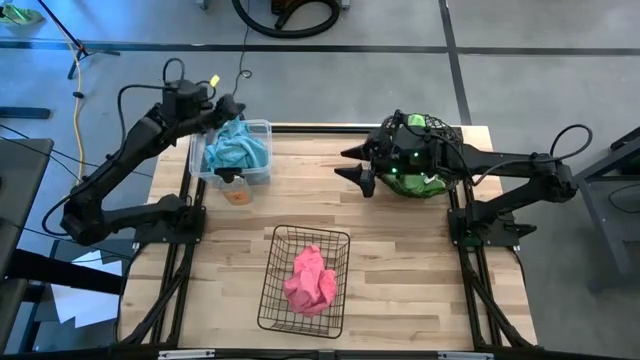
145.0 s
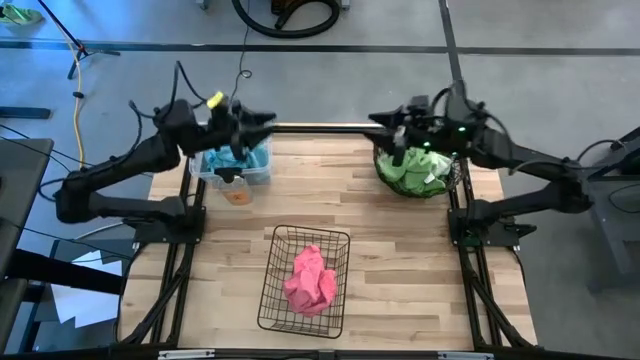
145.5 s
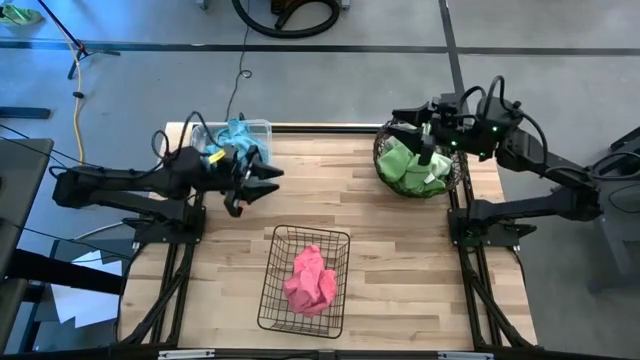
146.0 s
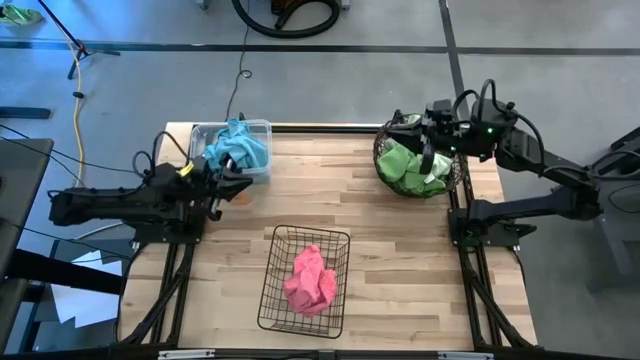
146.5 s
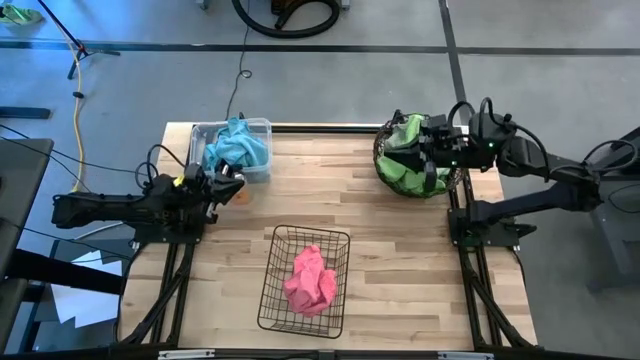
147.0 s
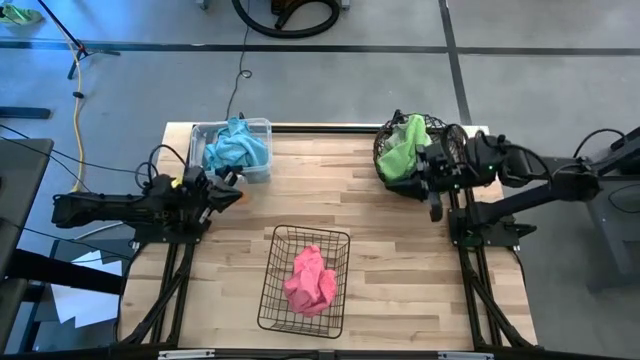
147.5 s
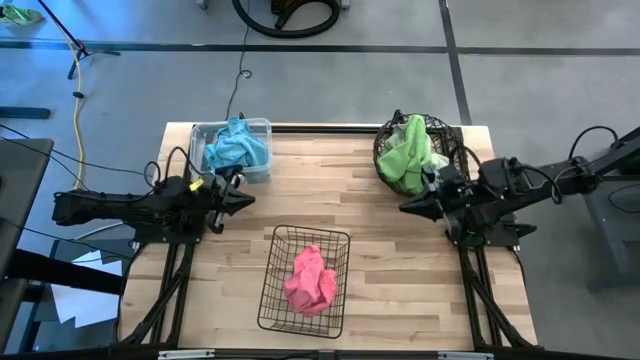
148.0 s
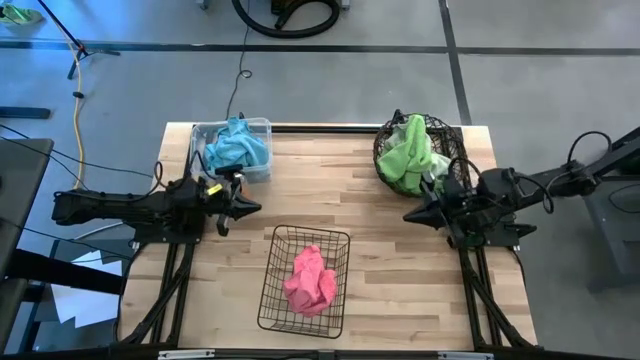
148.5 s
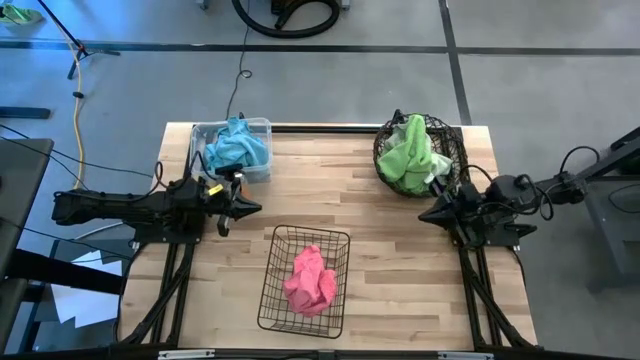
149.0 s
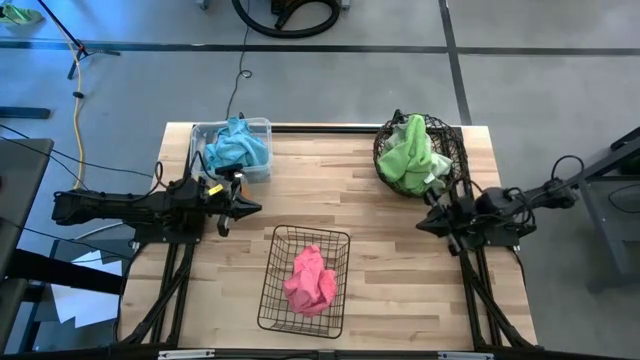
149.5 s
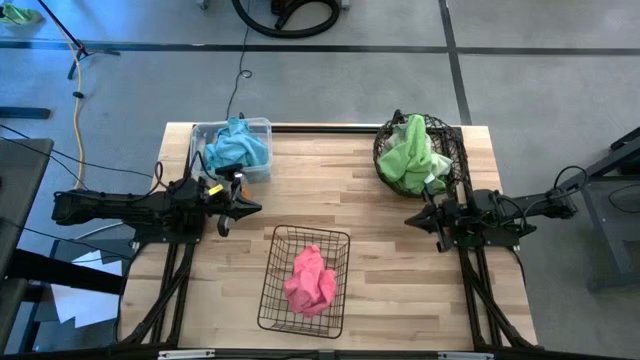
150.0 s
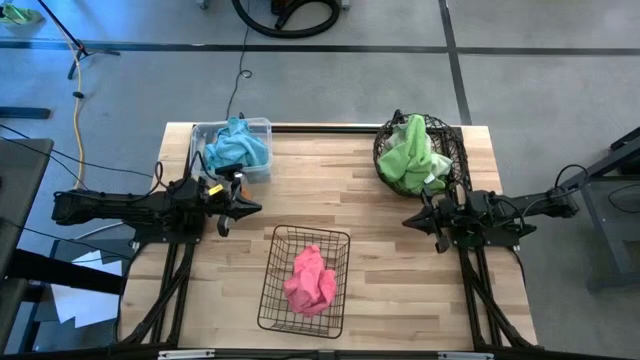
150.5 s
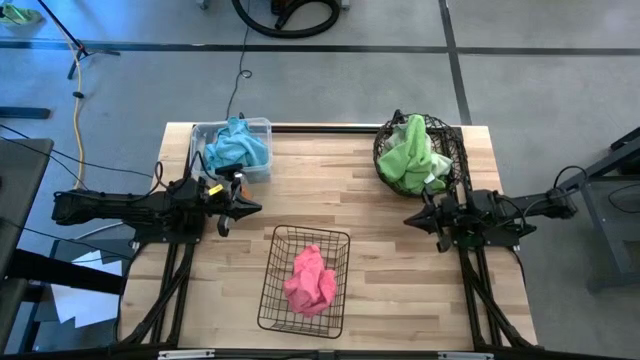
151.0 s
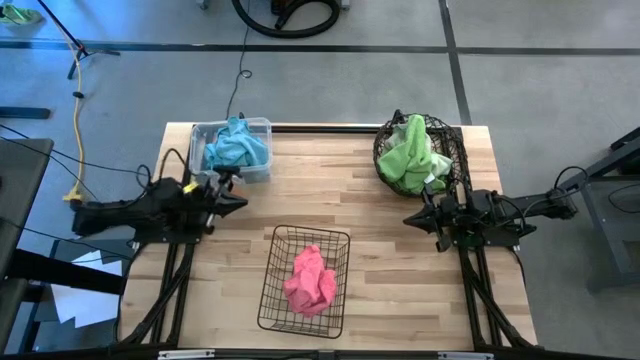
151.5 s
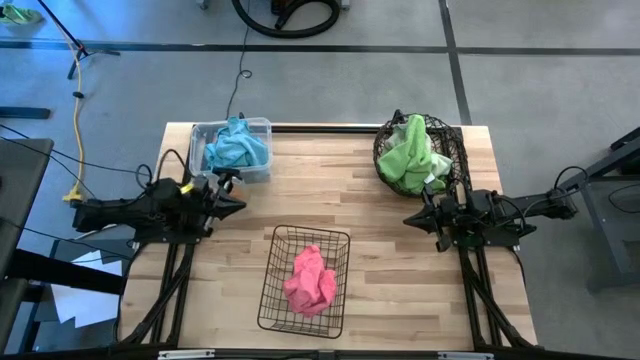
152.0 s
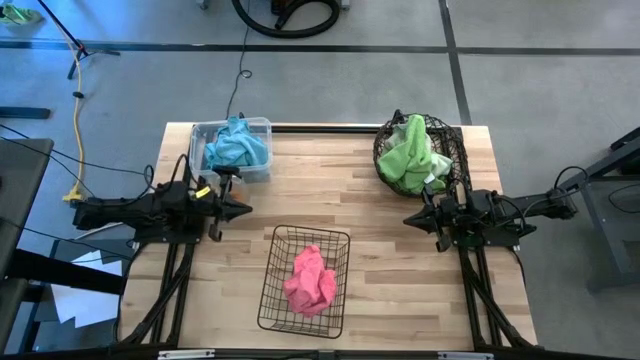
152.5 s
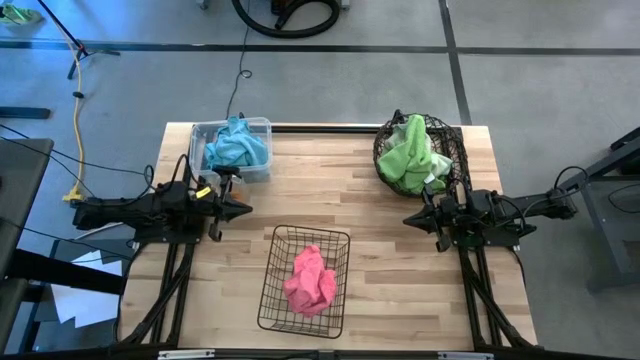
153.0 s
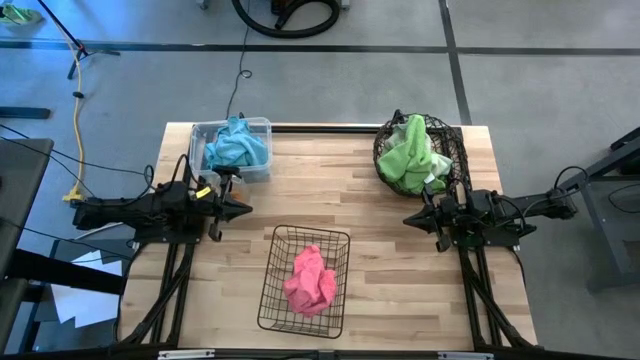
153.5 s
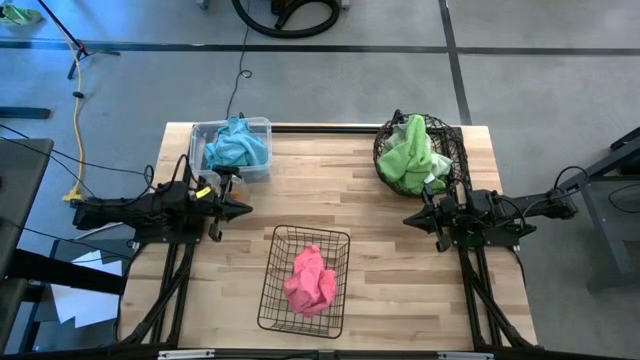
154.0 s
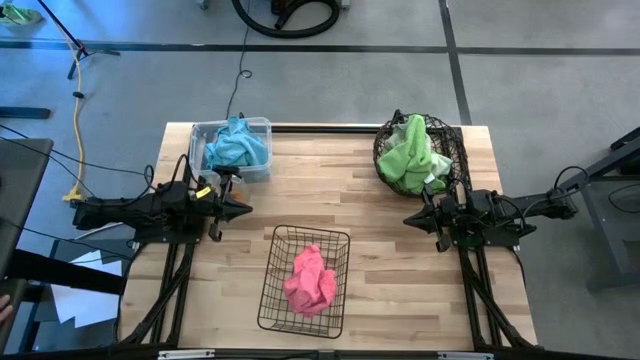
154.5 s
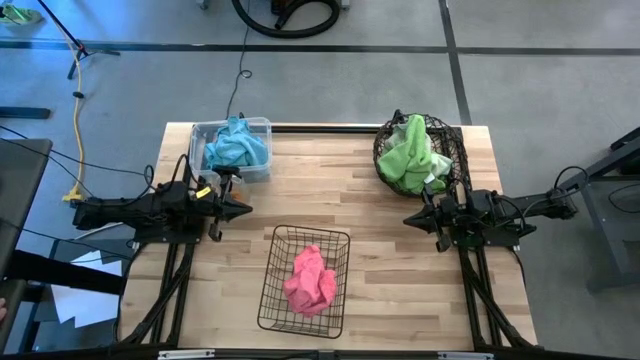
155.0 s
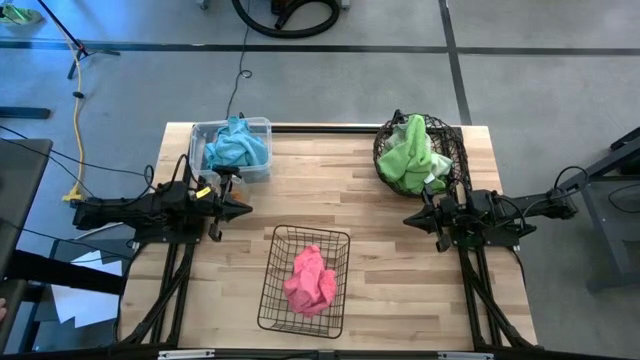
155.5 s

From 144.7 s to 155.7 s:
Task: Sort microfiber towel by color & place in baskets
Return to Home Position

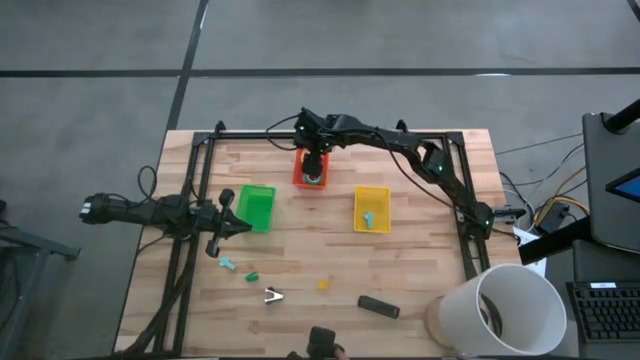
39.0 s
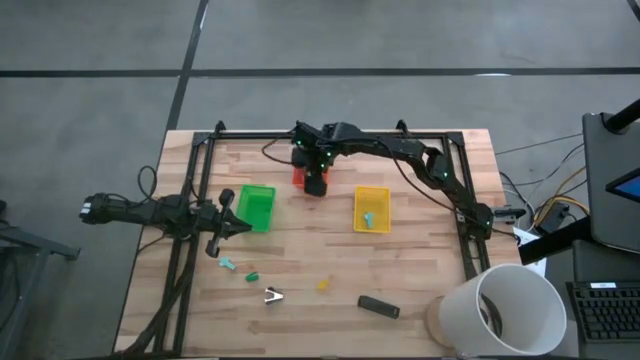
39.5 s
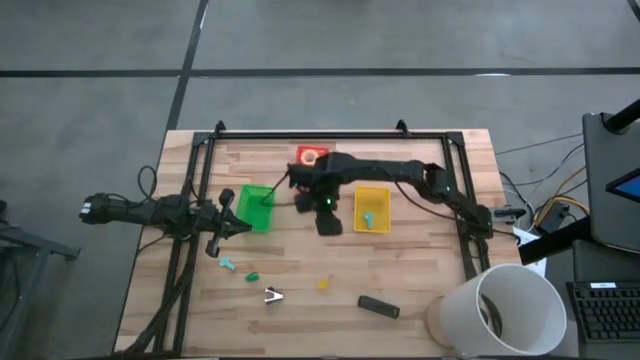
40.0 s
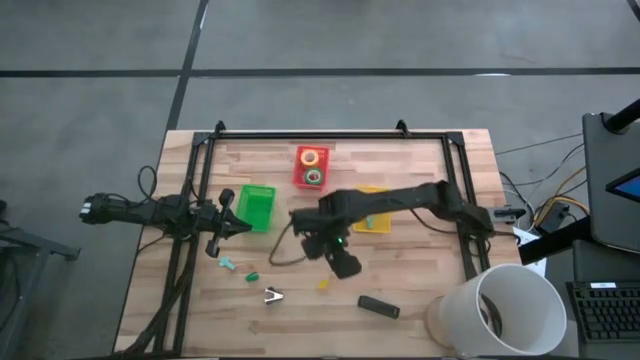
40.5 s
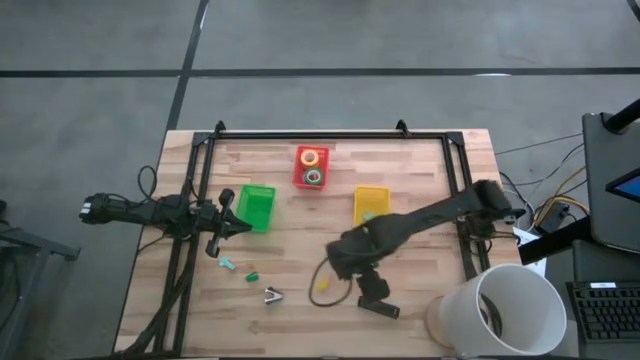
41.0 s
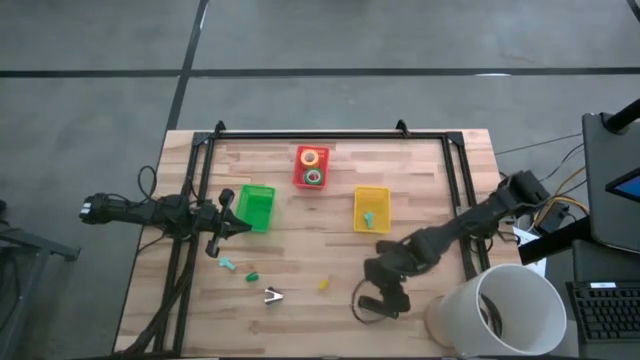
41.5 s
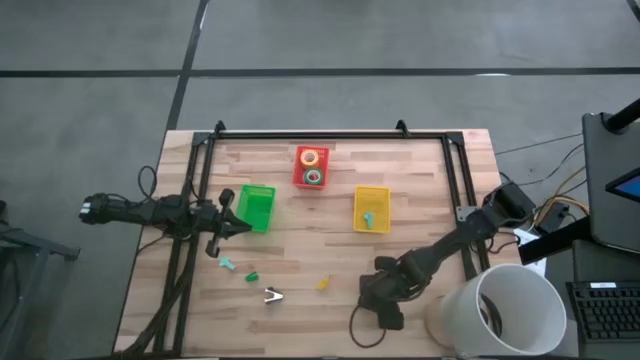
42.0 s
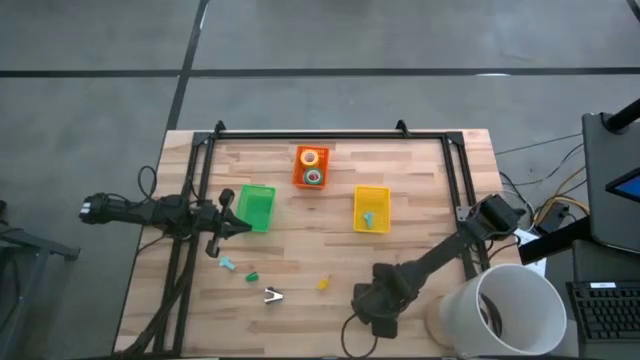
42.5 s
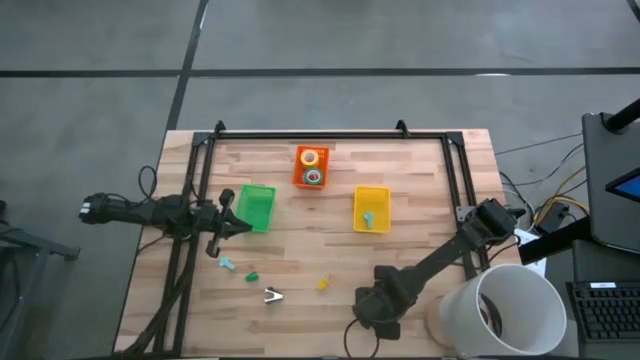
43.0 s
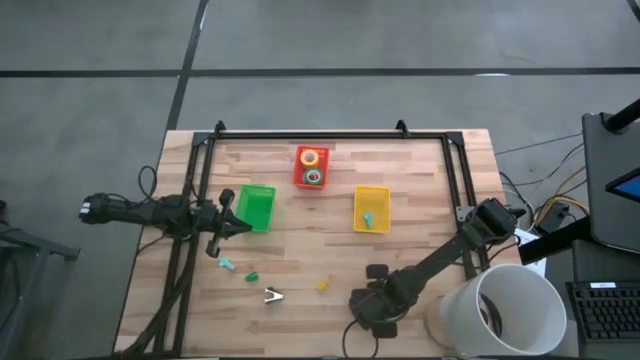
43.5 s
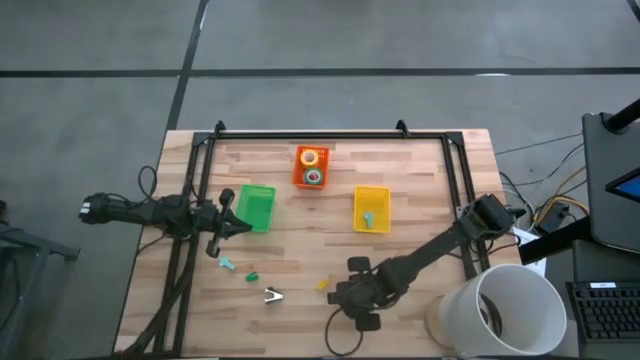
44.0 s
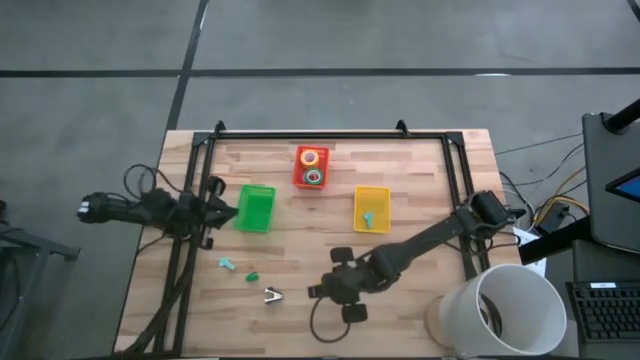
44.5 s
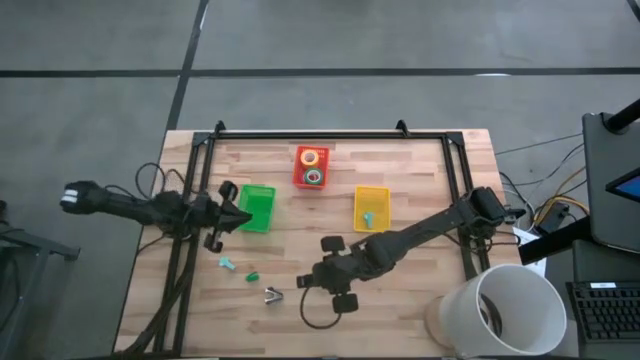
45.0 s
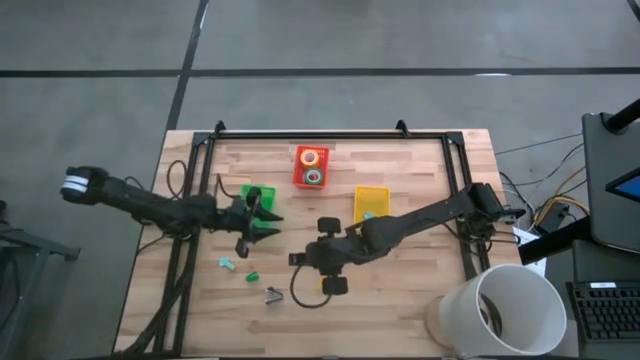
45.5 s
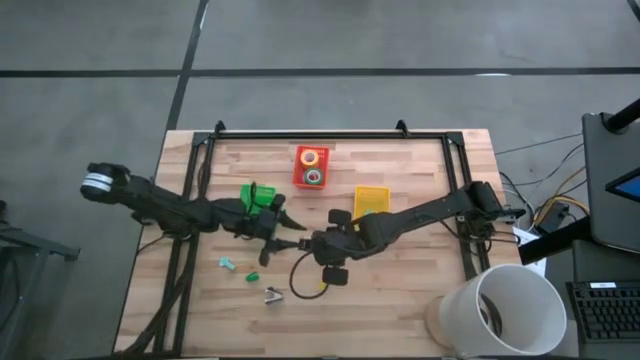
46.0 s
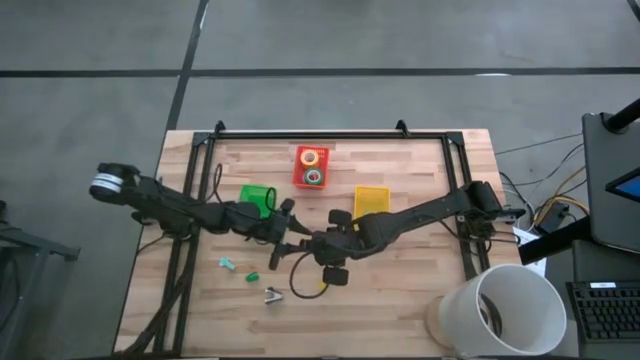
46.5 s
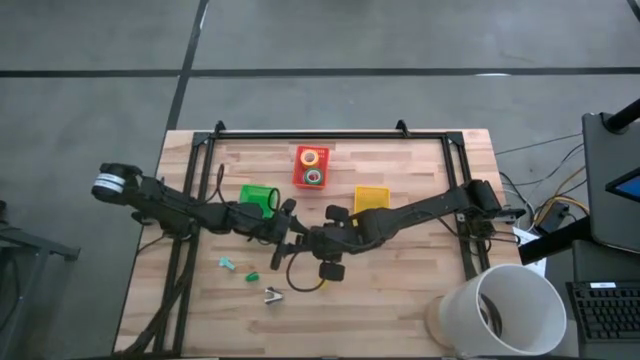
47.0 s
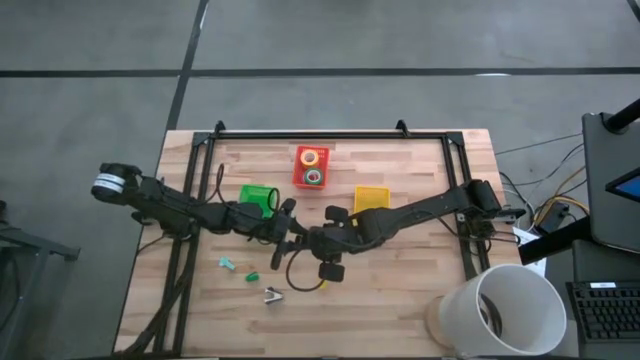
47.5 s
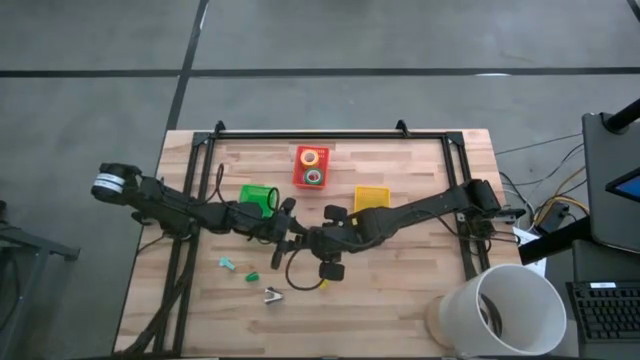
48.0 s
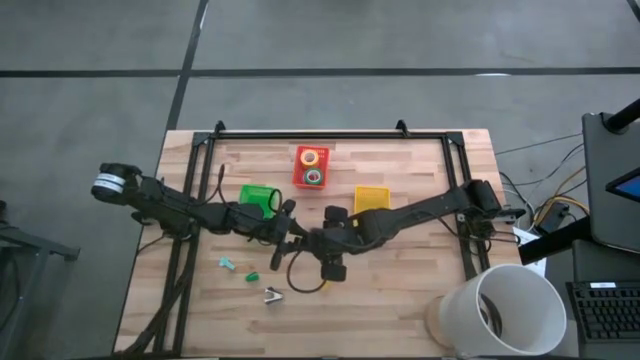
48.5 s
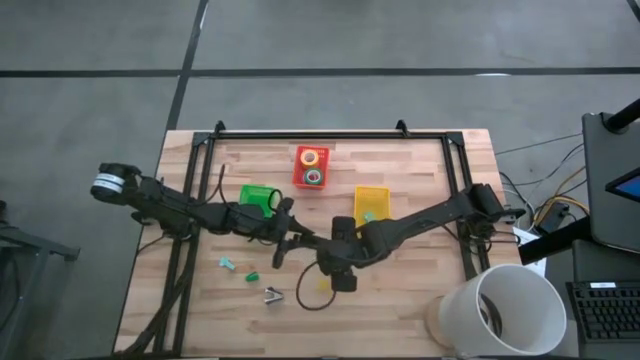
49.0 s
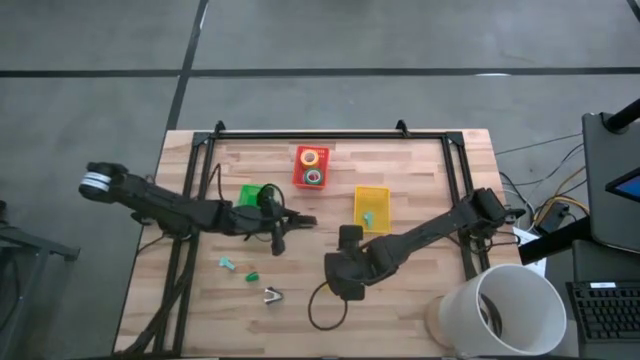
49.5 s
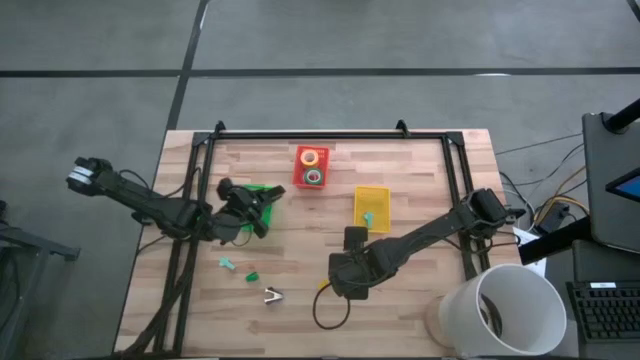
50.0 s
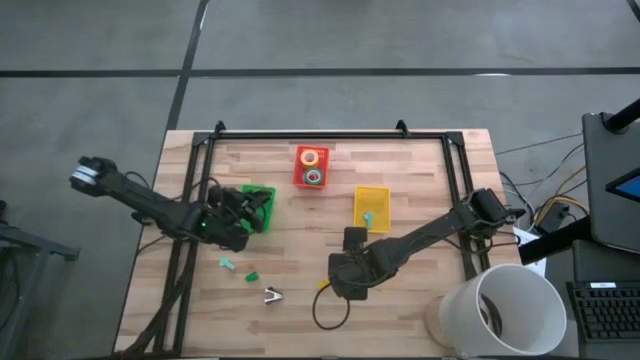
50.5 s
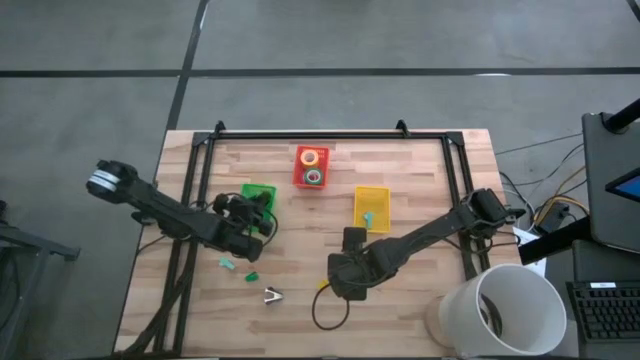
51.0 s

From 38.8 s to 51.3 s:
Task: Pick and place Stapler, Stapler remover, tape
Put the black stapler into the green basket
